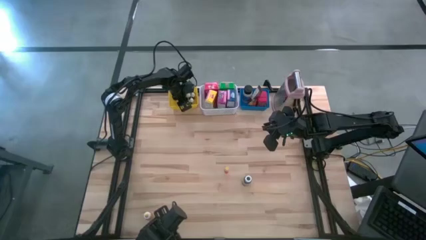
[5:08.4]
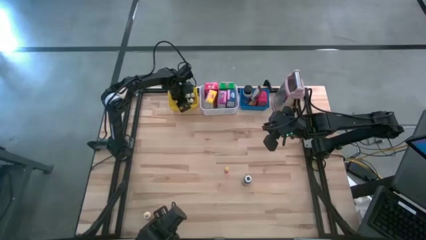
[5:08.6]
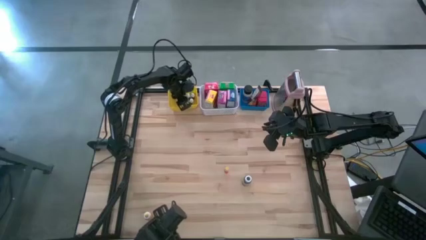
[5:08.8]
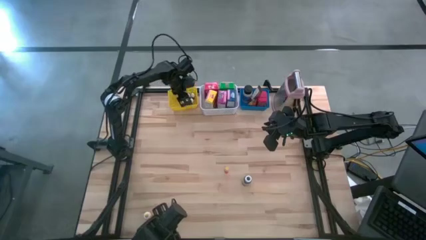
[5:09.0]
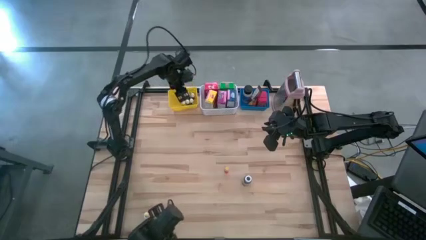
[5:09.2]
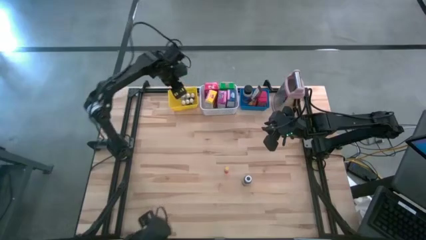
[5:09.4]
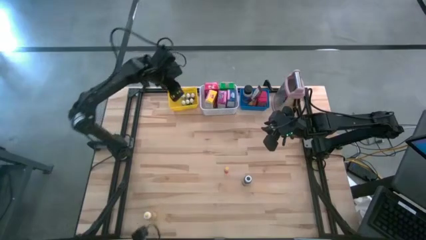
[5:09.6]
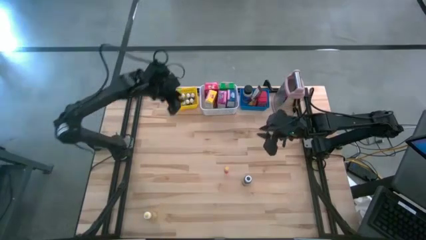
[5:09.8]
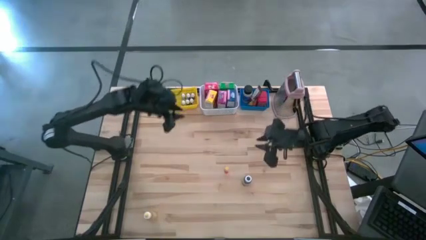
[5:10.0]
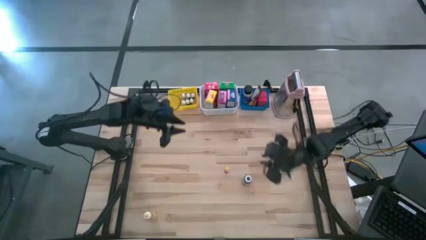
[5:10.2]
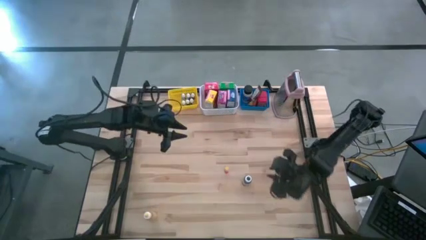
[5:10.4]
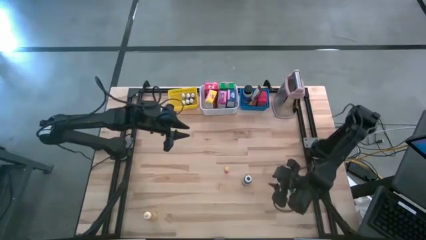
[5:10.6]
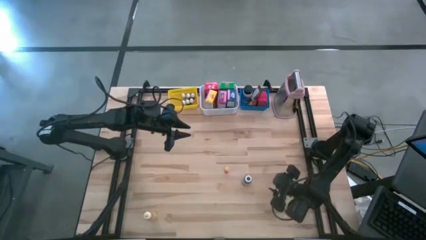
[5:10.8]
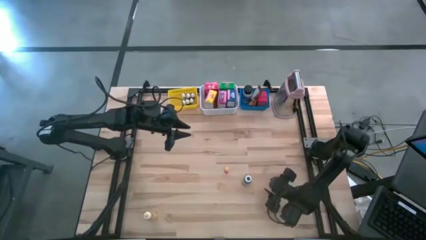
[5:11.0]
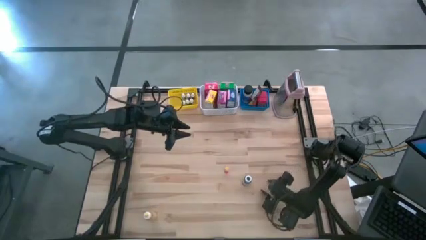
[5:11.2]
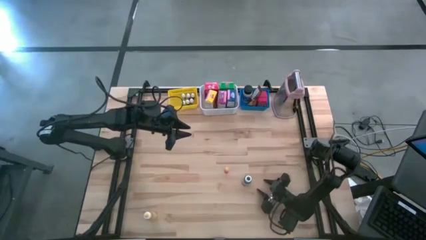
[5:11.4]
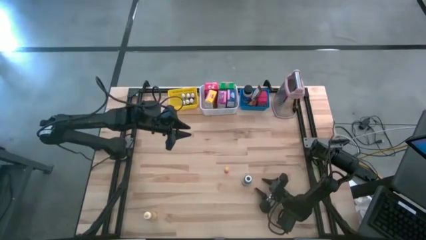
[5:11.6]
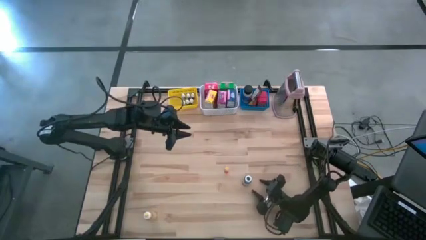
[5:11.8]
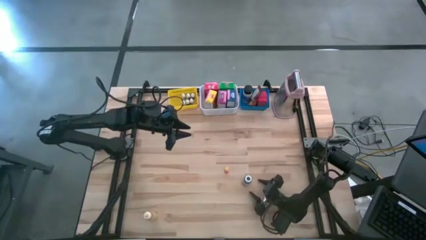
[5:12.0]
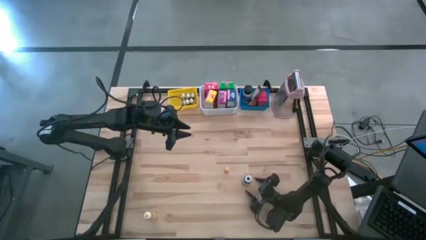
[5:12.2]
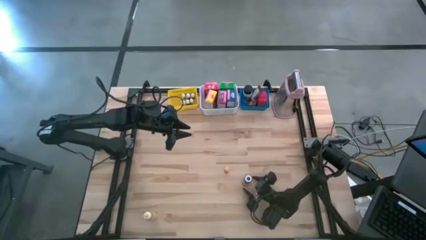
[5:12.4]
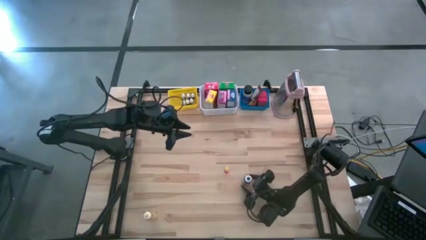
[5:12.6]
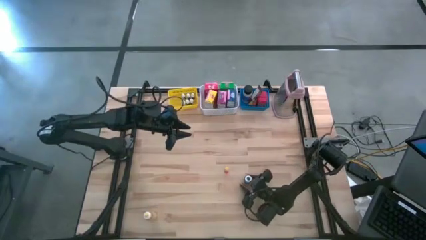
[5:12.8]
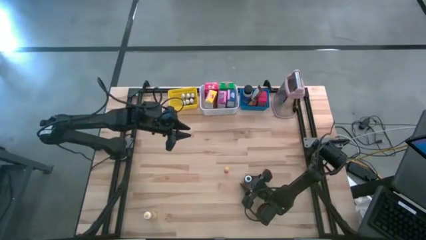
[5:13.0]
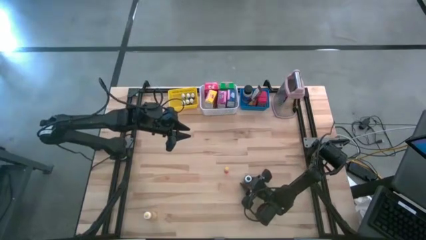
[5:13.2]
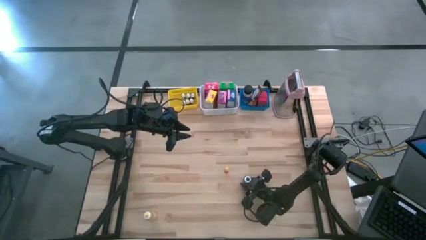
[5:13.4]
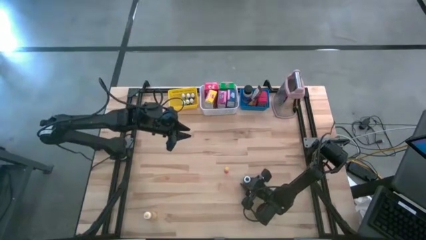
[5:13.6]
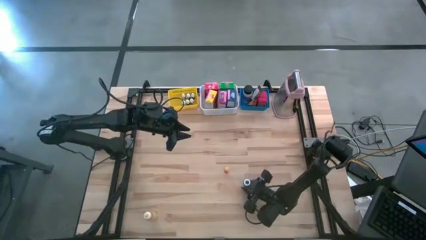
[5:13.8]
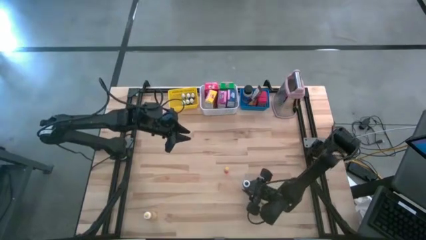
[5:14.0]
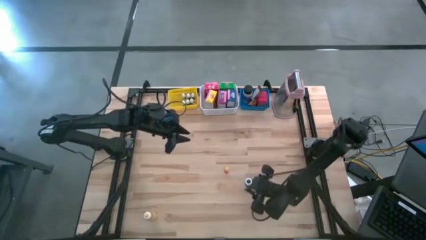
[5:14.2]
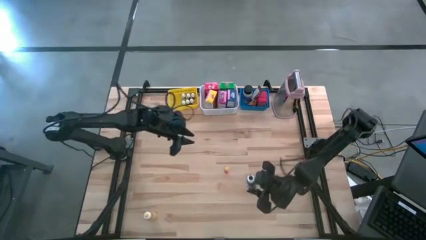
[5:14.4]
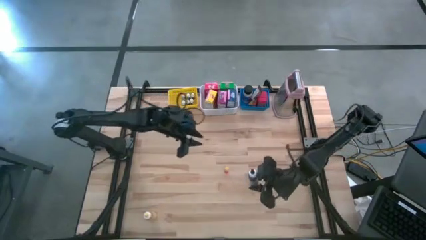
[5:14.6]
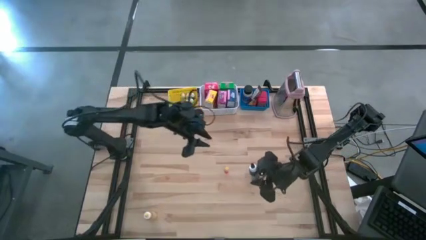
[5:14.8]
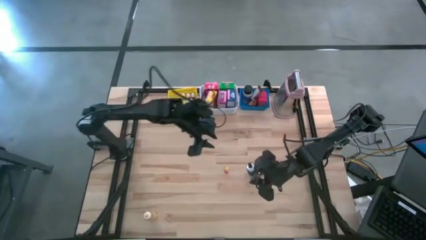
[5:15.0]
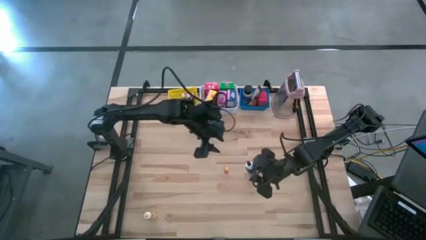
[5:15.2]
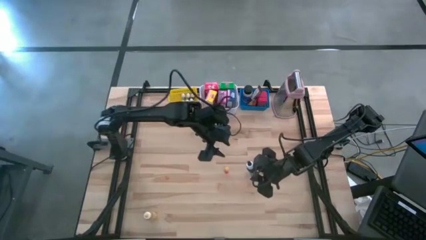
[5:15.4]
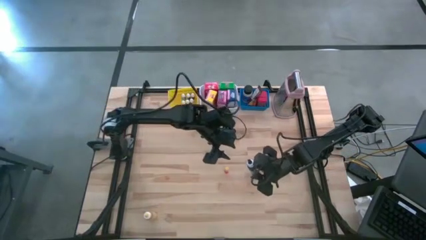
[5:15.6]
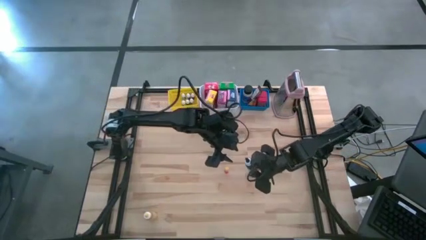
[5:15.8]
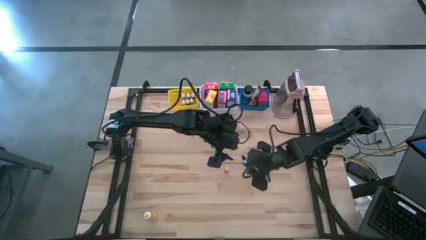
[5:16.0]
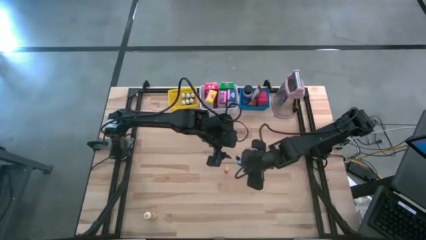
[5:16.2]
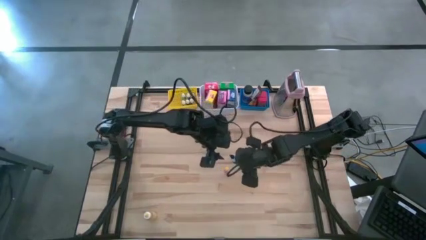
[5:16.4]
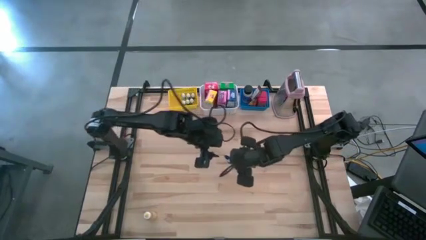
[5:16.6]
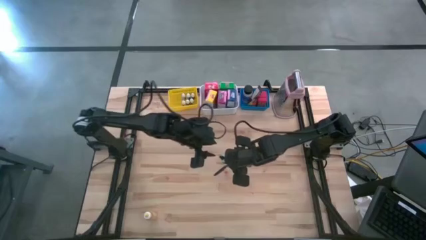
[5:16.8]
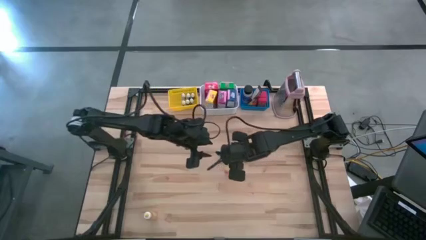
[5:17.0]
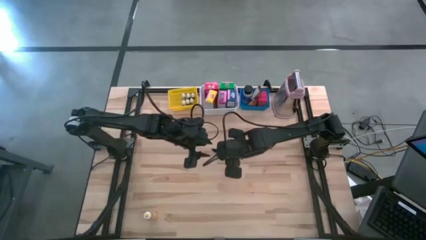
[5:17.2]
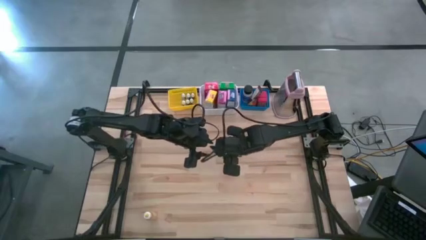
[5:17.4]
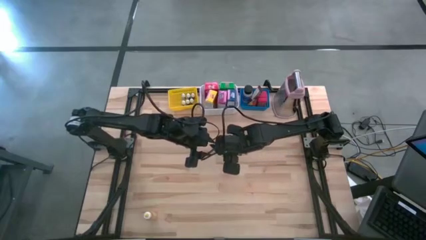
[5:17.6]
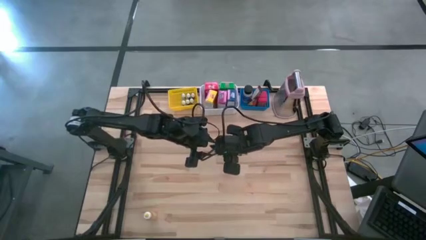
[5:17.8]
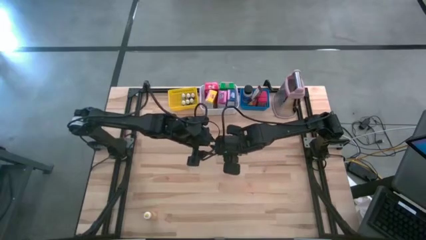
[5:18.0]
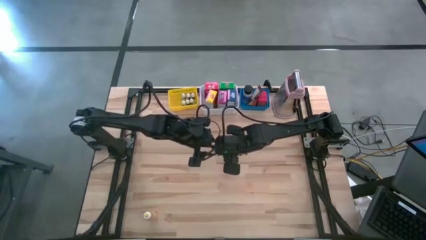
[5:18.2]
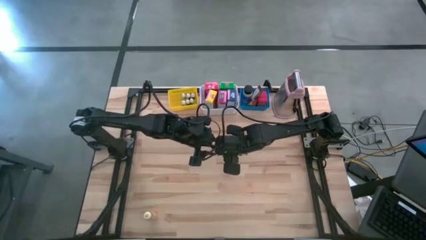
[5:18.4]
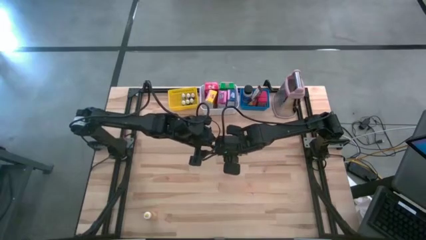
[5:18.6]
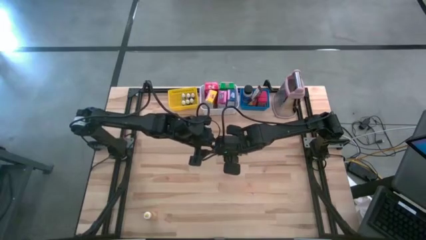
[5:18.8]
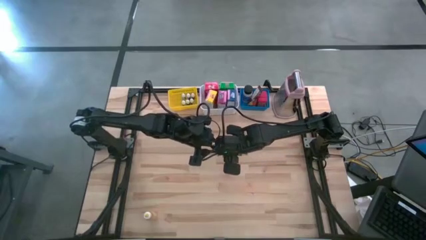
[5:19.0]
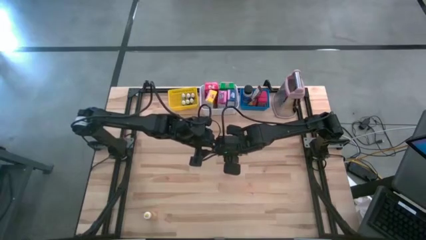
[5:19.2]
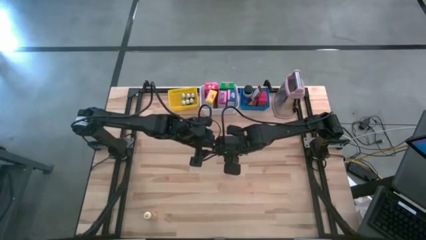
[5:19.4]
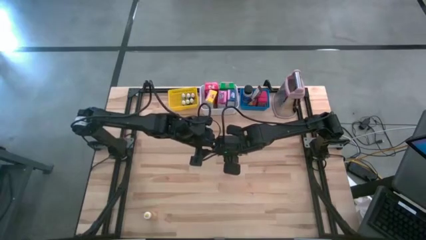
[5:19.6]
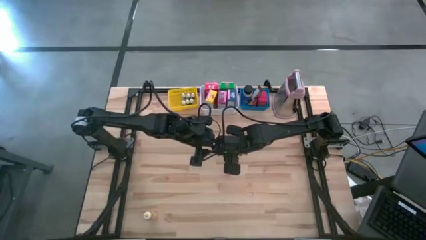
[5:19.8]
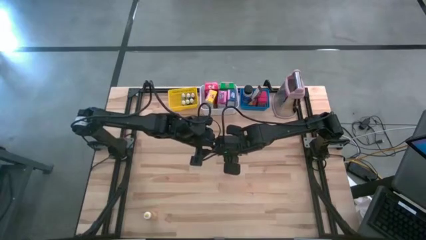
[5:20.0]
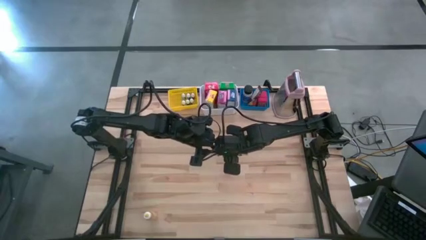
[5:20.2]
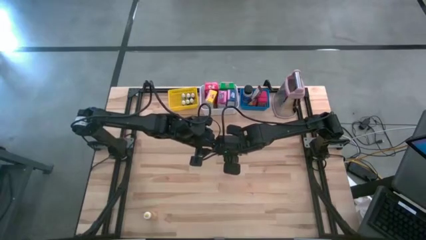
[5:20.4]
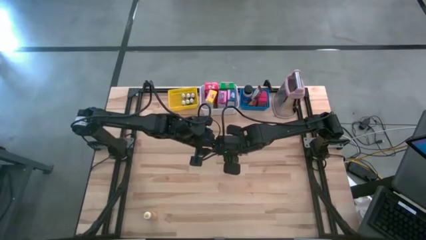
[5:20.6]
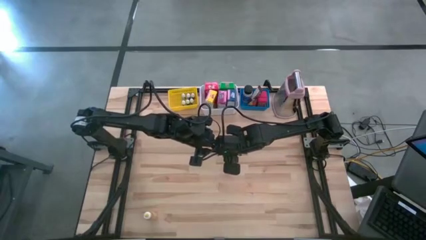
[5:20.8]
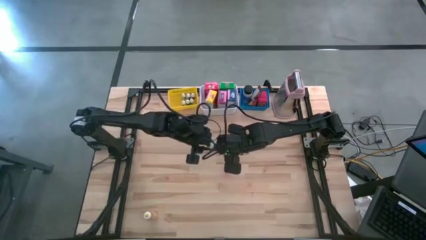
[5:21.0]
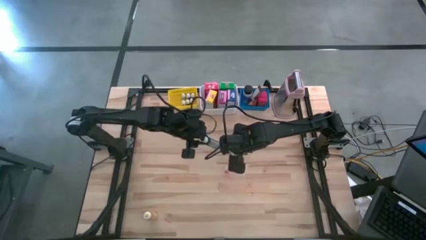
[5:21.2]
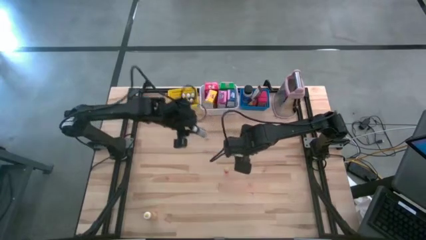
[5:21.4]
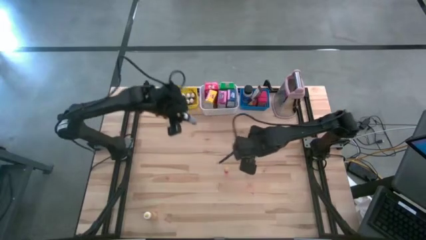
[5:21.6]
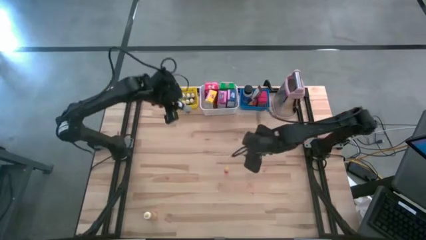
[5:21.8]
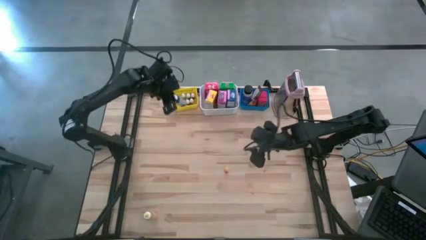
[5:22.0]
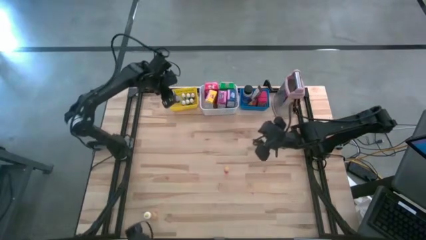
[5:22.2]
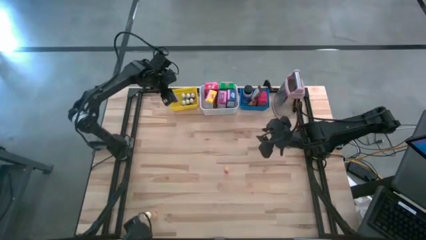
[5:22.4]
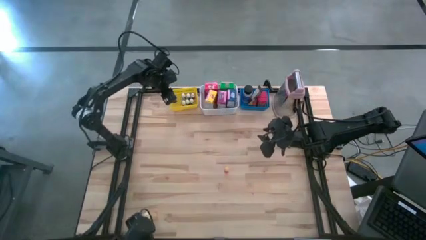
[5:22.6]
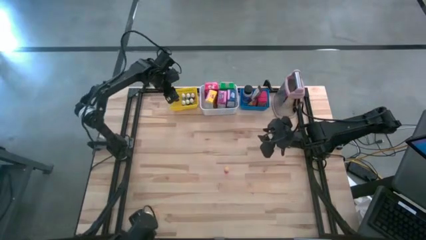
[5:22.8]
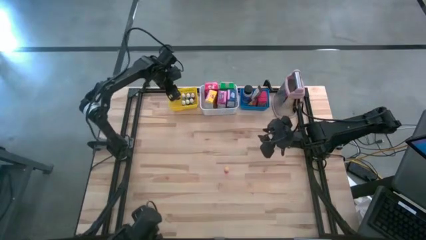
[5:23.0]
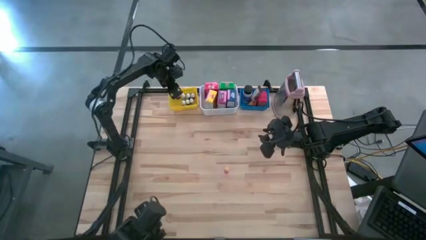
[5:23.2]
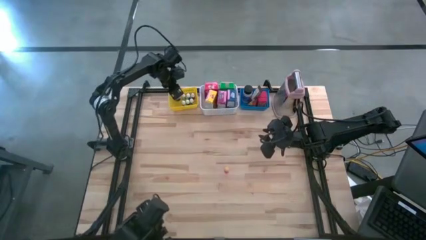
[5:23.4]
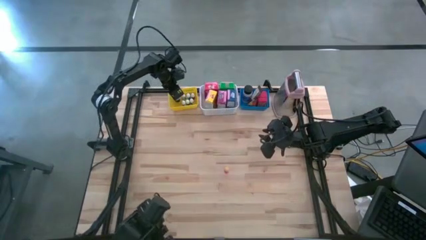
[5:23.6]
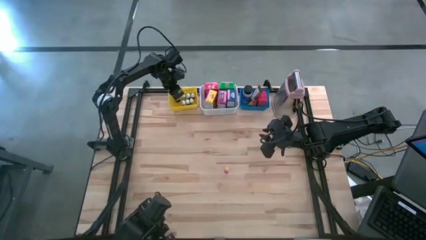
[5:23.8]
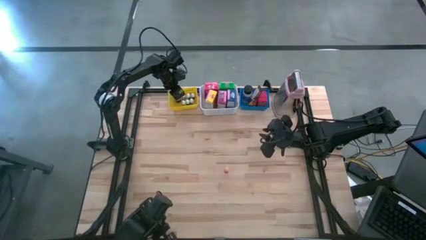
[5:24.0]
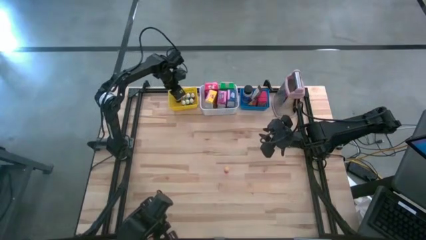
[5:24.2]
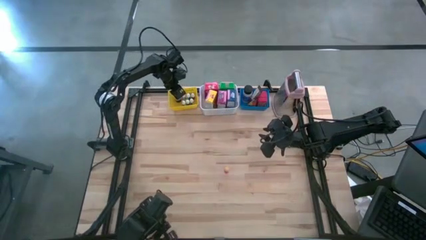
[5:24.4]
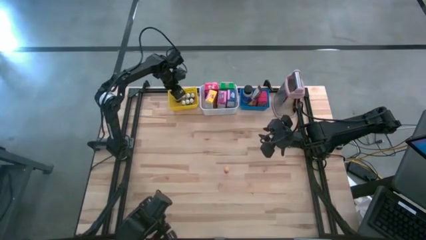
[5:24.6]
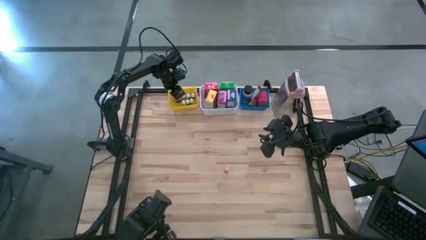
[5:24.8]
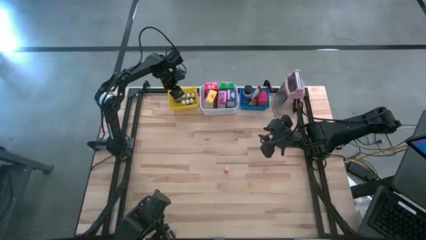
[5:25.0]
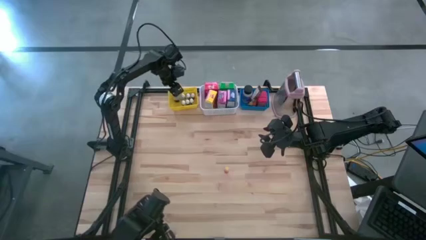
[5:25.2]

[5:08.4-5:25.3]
Task: Pick & Place Kitchen Items
Put the black food coloring bottle into the yellow basket
